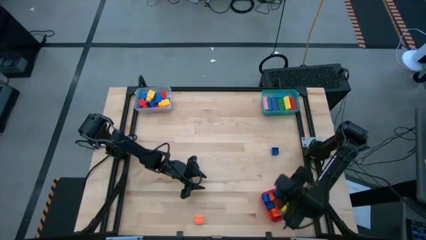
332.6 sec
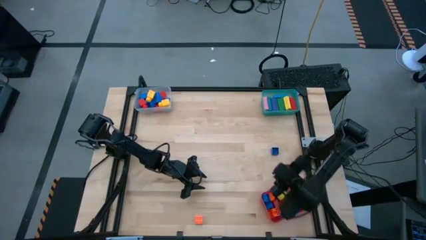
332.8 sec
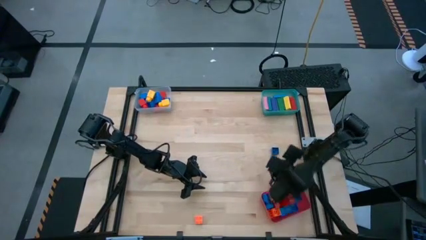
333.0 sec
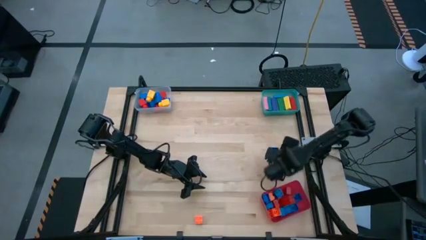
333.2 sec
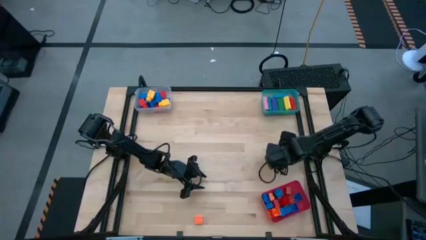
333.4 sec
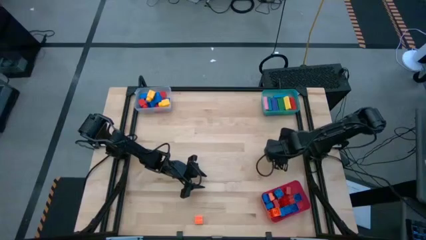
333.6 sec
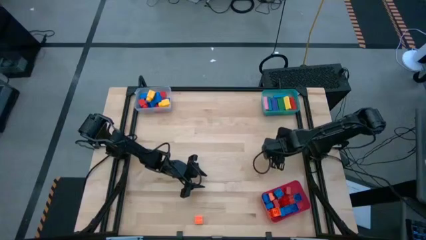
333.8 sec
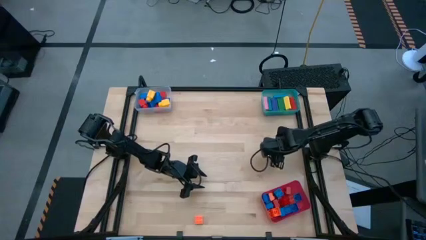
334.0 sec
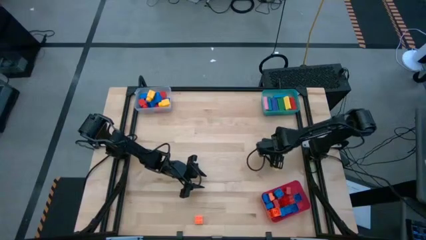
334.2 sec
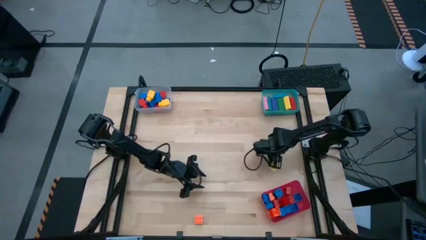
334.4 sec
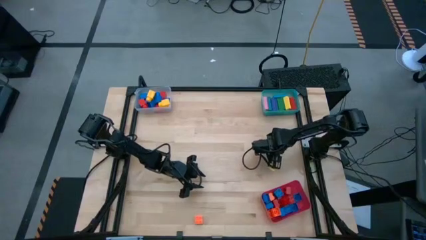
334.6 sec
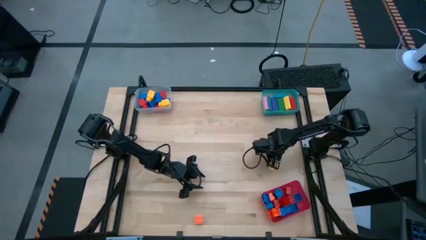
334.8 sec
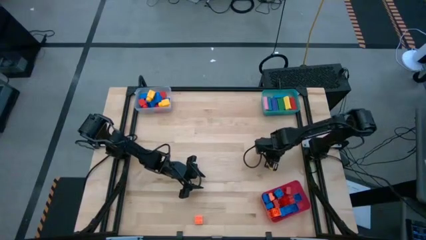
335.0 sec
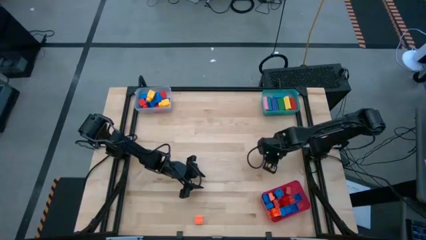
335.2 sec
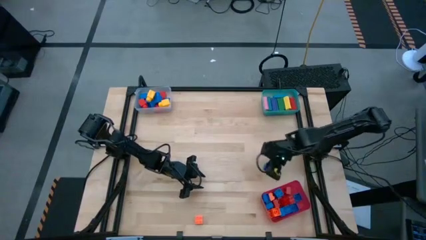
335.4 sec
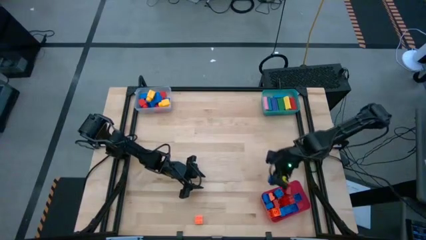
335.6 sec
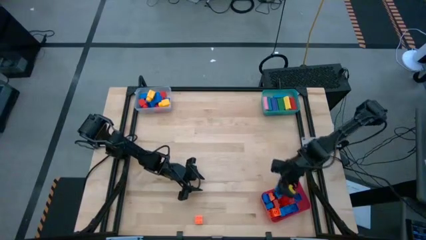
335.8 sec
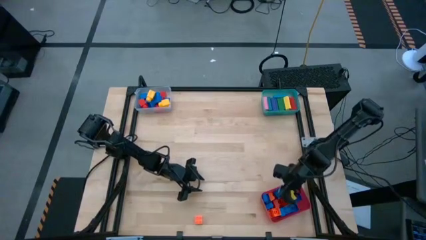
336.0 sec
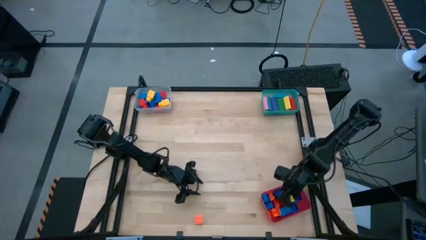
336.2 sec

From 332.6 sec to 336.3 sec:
Task: Sort blocks by size
Put the small blue game piece into the red bin

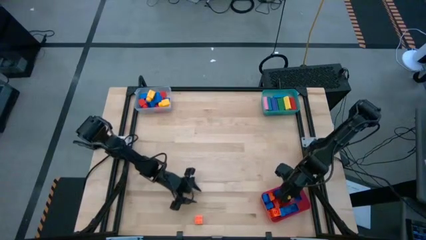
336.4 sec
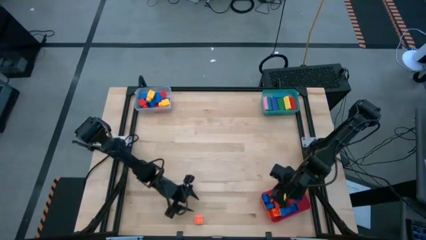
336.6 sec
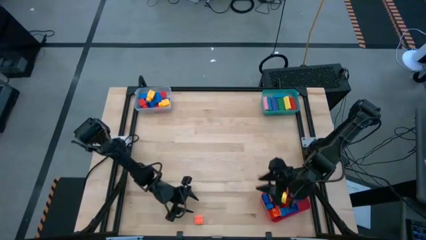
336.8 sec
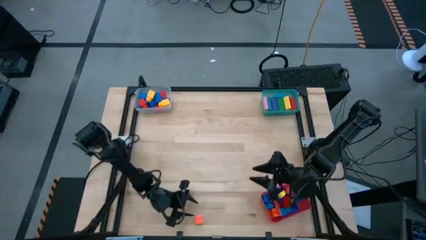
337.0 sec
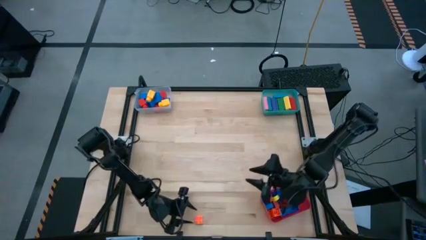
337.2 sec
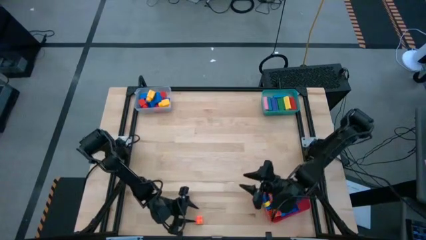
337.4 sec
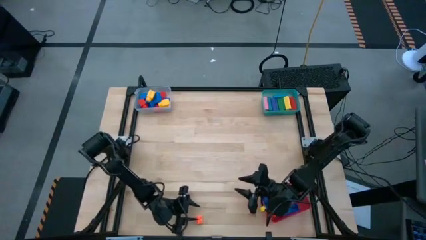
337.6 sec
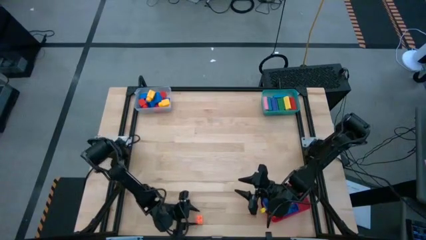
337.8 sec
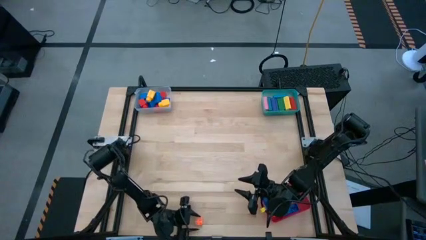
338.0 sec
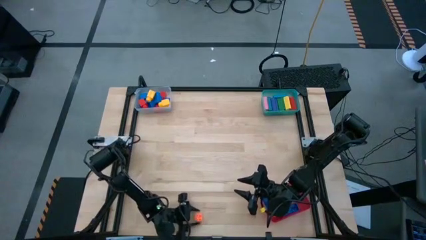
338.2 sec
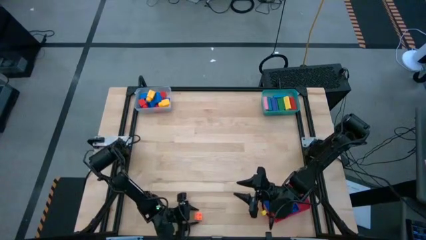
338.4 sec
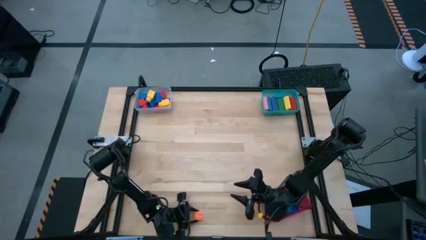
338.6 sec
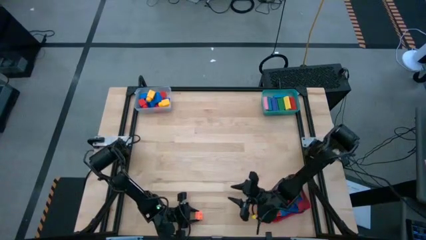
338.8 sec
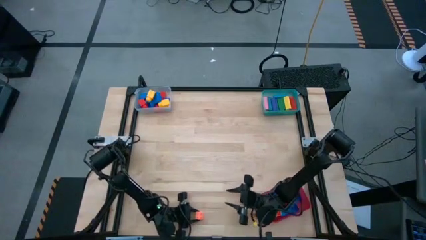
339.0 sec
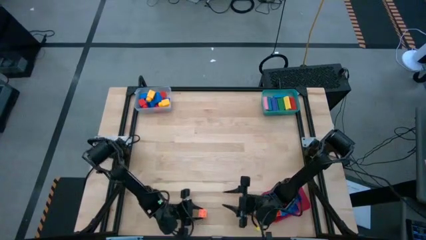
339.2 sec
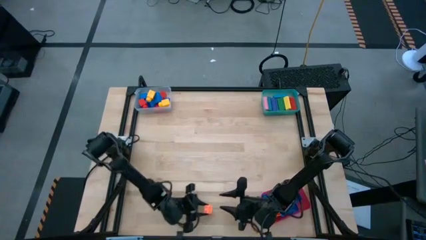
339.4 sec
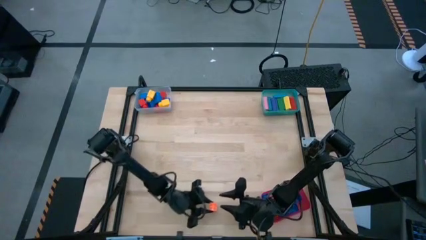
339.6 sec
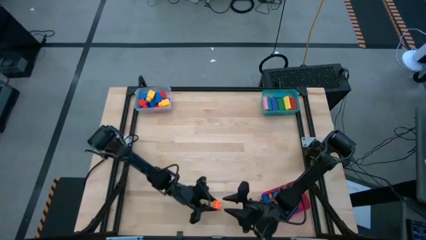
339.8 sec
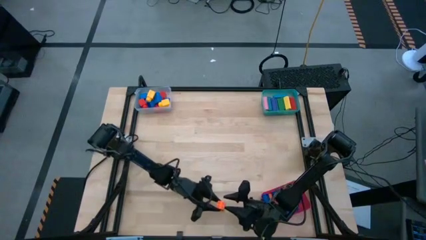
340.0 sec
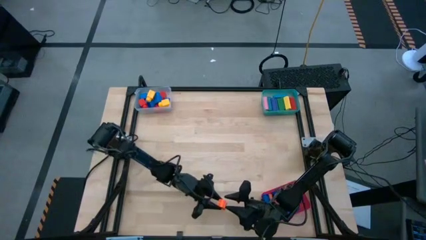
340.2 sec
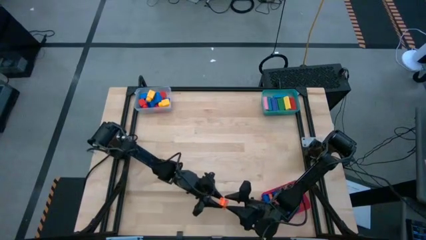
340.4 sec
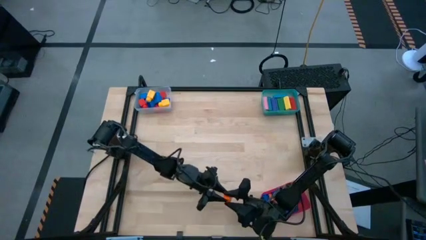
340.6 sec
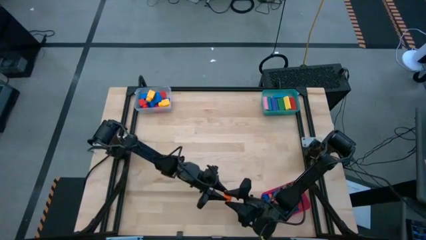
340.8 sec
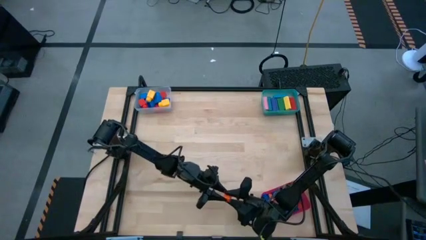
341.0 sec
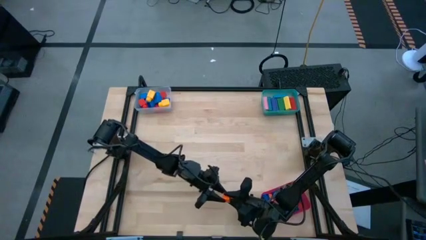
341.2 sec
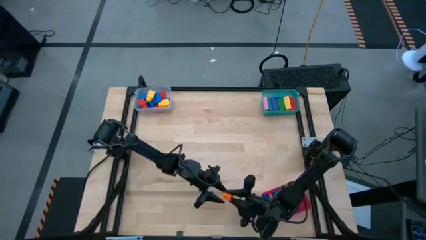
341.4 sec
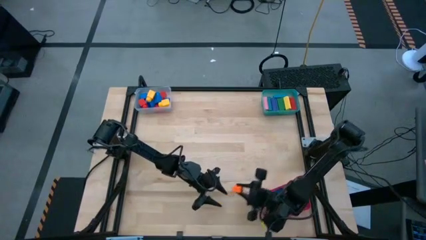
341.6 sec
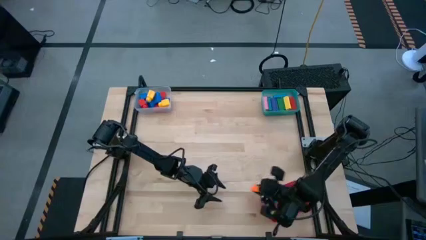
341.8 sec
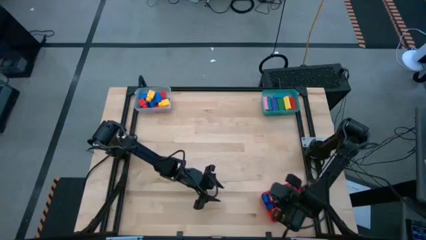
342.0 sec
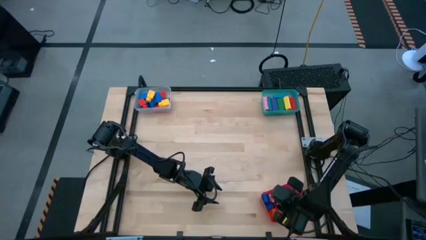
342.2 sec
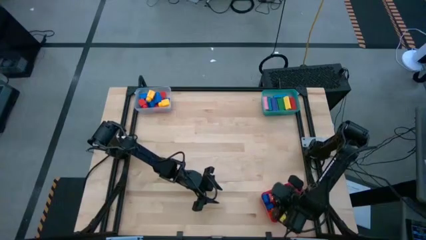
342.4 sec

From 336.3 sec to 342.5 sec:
Put the small orange game piece into the red bin

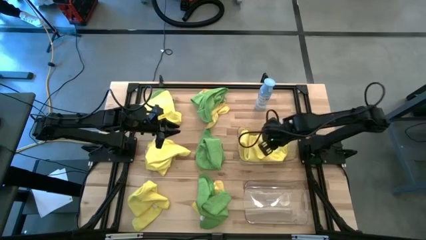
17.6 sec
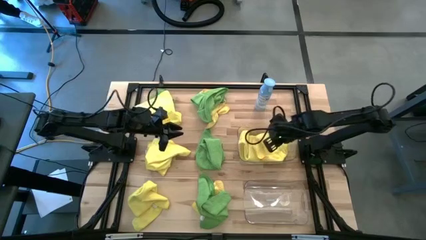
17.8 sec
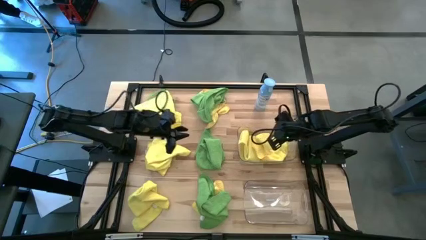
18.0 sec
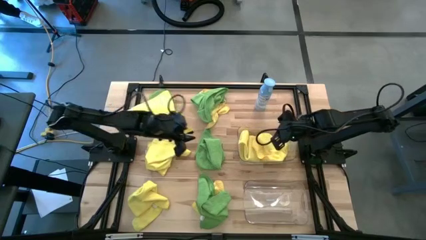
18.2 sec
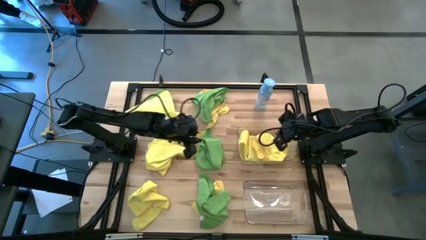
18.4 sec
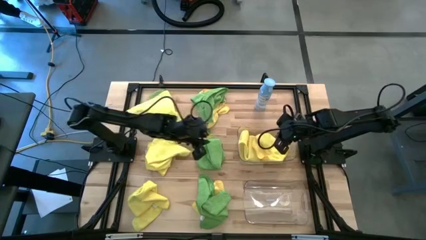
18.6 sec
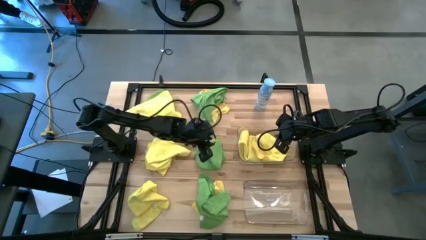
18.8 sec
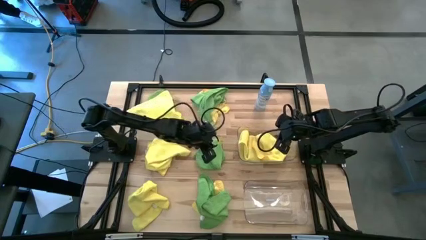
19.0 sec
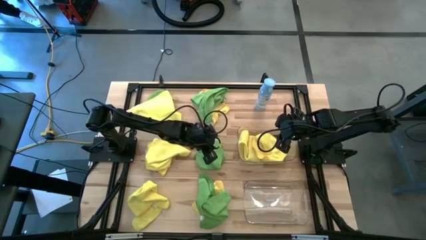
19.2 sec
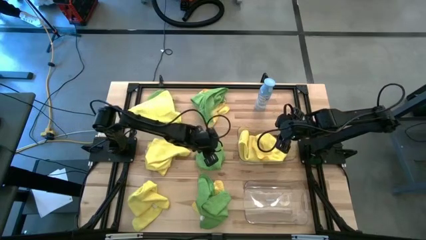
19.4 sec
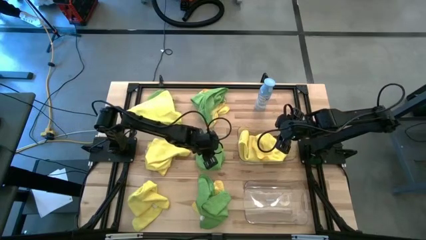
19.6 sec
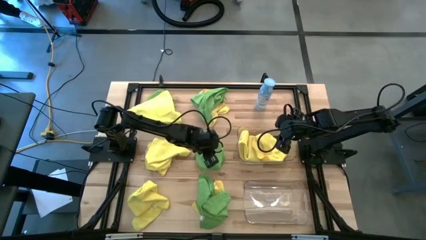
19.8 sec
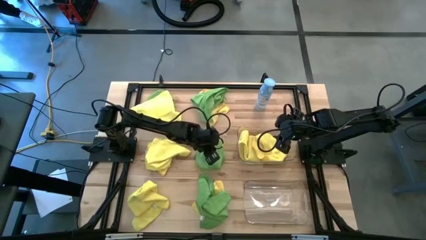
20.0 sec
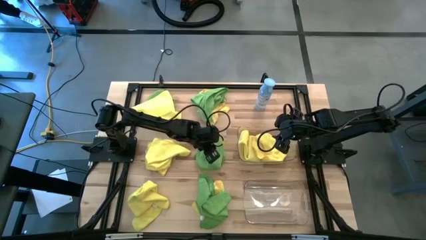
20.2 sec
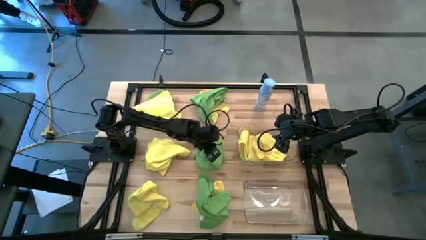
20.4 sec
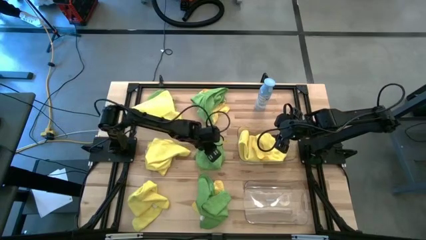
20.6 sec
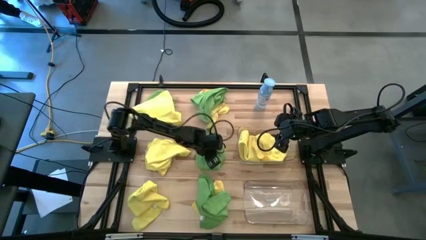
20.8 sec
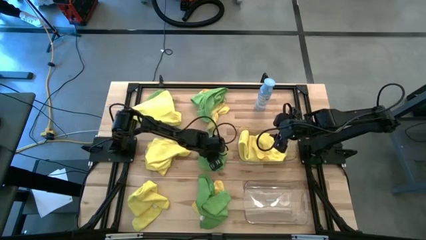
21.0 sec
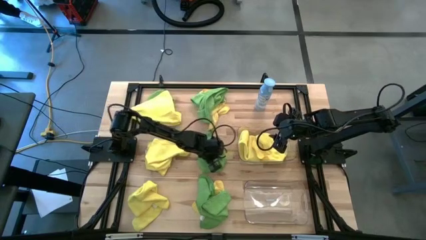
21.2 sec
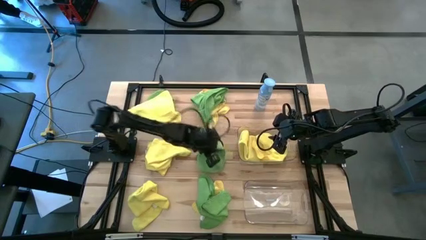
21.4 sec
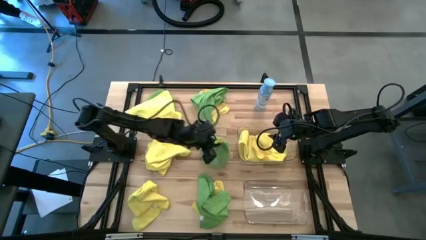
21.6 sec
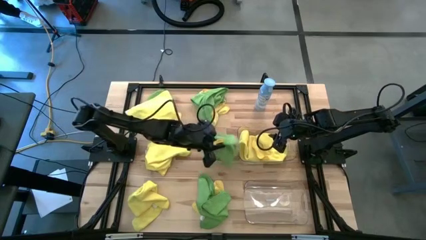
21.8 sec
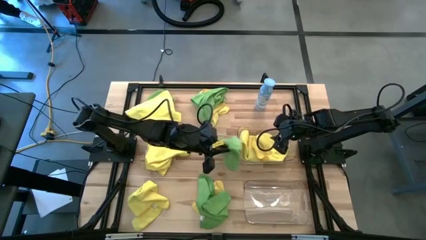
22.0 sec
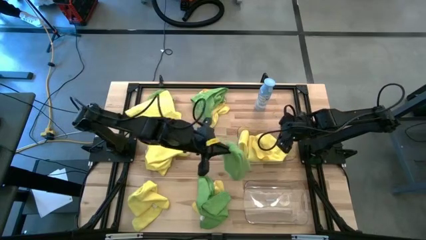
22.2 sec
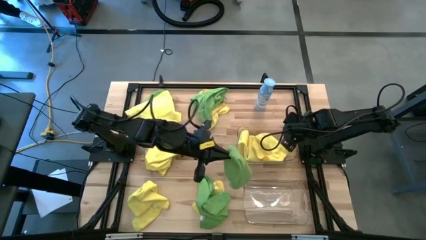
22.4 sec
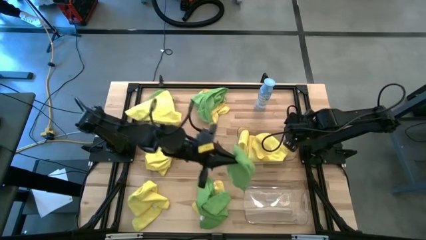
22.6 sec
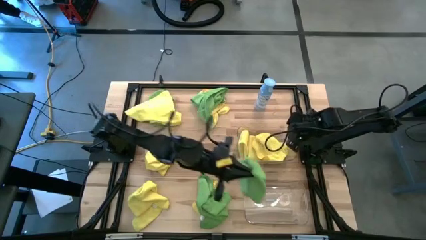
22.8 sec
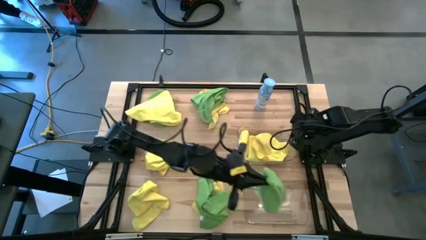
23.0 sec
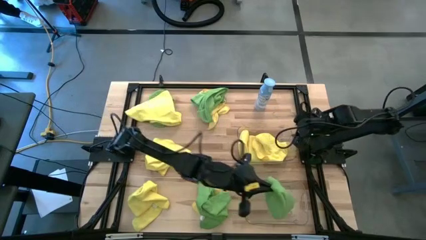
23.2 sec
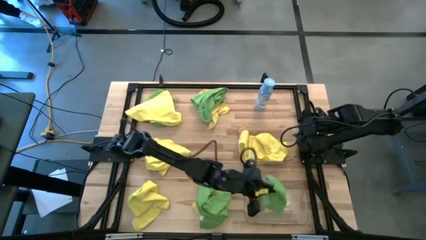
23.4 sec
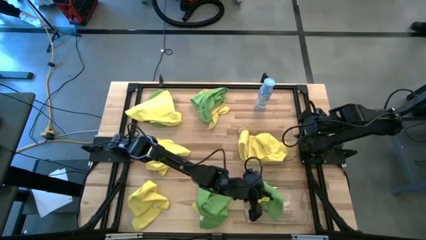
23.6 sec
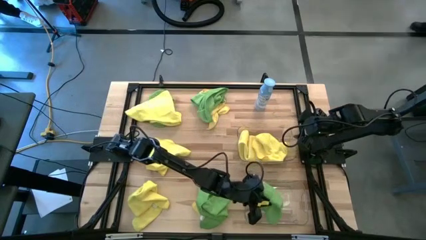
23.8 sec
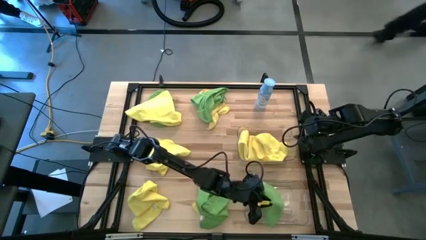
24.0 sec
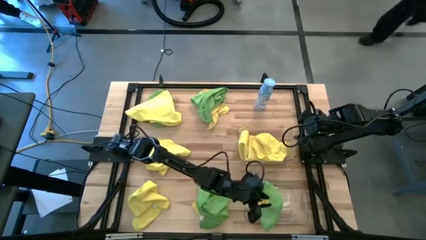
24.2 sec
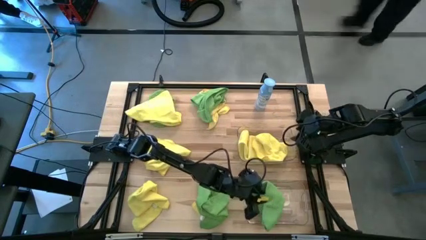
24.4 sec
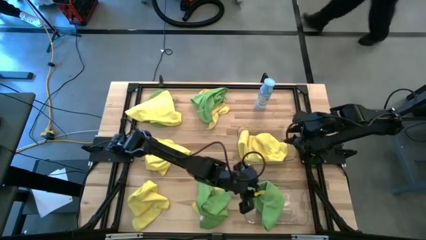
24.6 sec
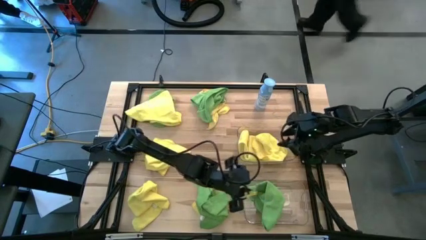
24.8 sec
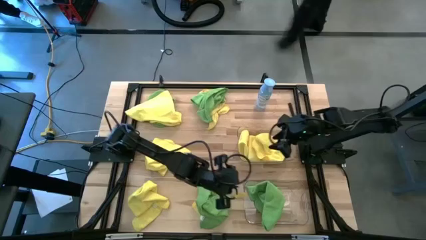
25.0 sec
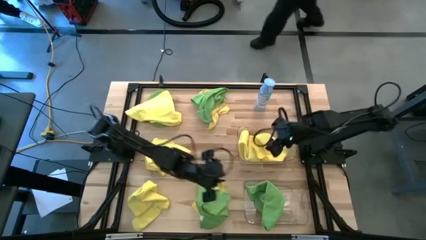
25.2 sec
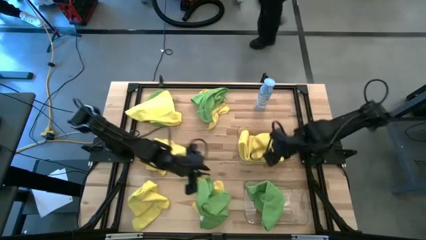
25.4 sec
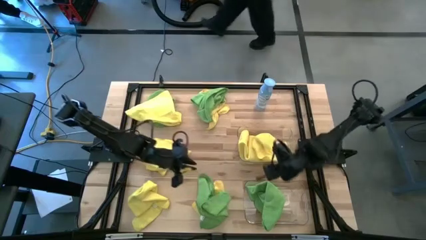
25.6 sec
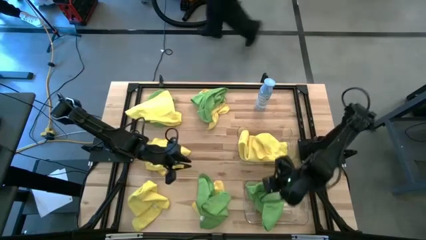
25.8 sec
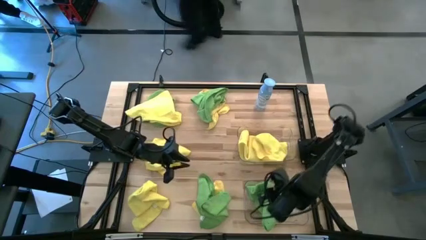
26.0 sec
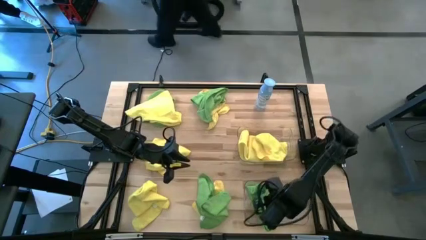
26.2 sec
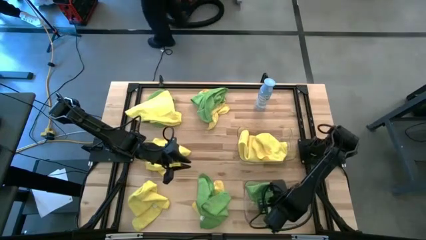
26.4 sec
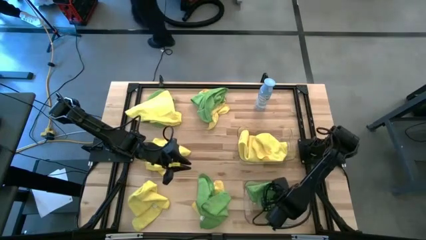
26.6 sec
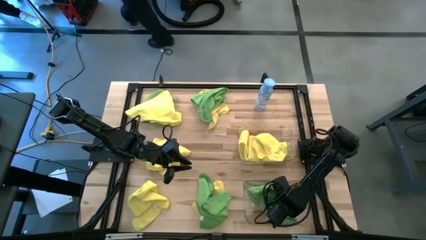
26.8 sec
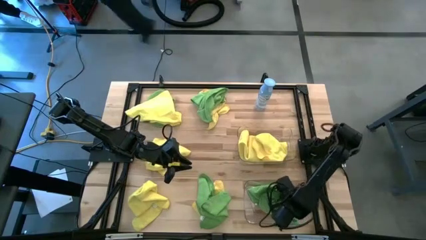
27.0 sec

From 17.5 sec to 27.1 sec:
Task: Sort microfiber towel by color & place in baskets
Put the green microfiber towel into the bottom transparent bin
